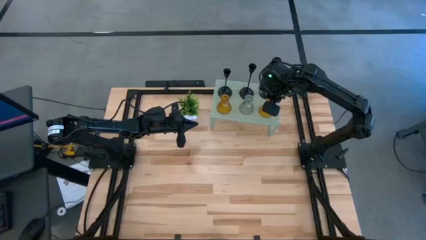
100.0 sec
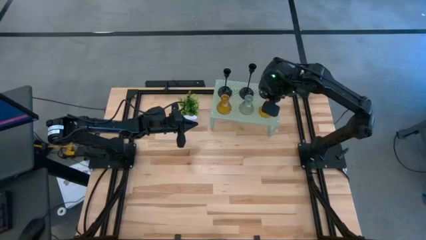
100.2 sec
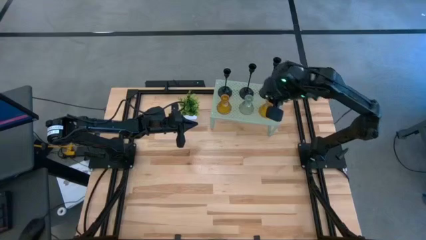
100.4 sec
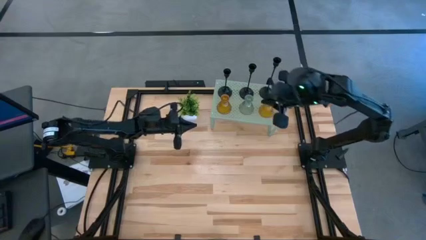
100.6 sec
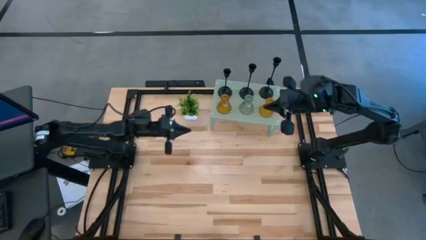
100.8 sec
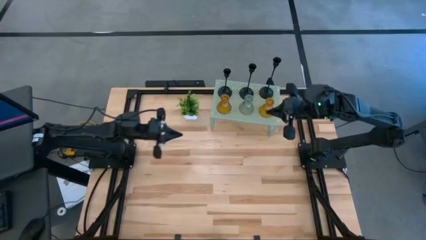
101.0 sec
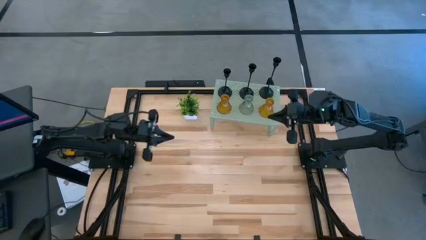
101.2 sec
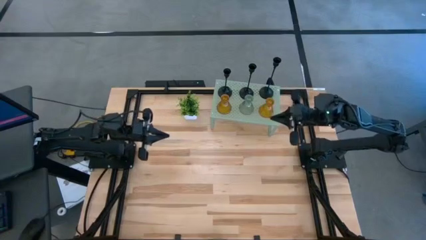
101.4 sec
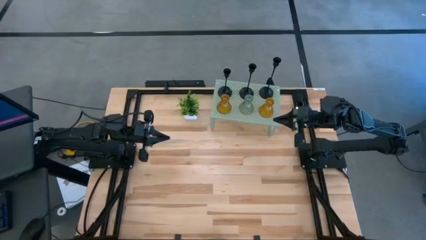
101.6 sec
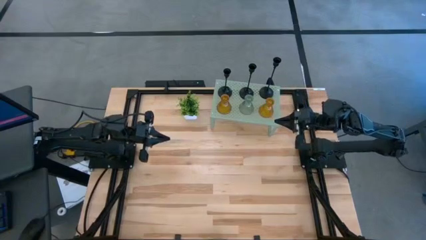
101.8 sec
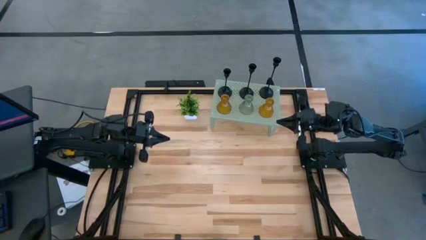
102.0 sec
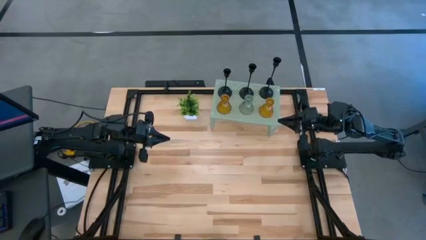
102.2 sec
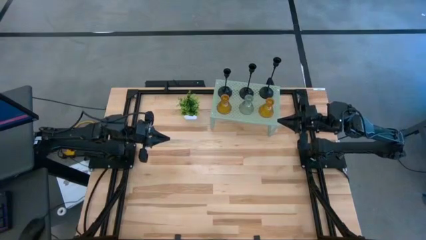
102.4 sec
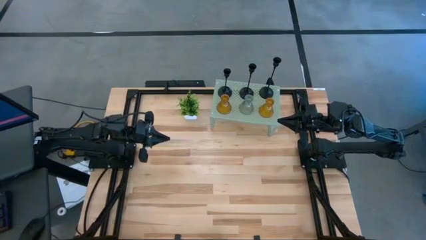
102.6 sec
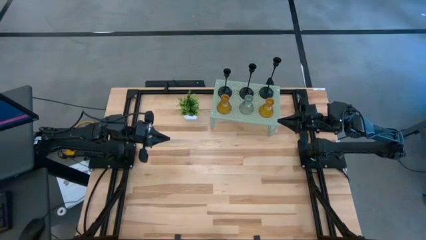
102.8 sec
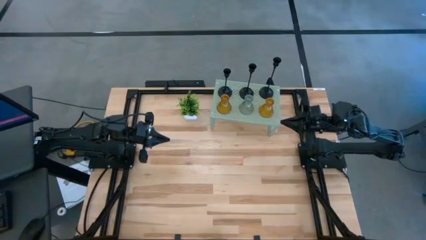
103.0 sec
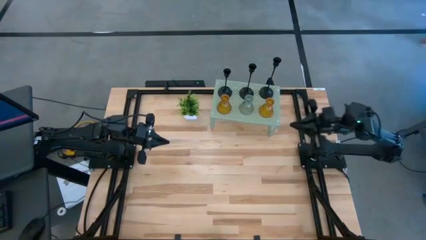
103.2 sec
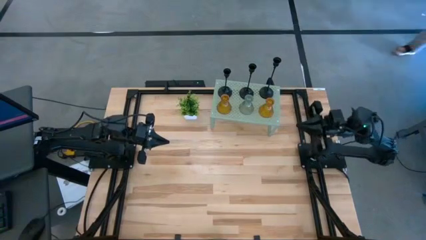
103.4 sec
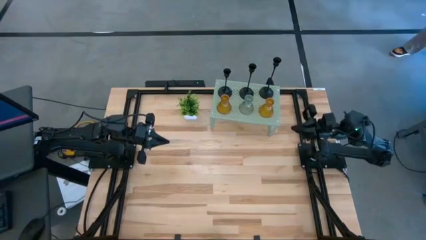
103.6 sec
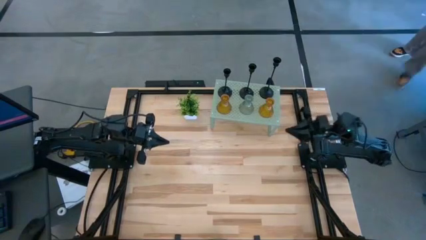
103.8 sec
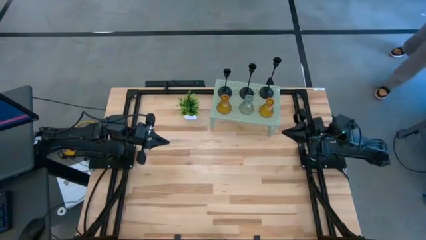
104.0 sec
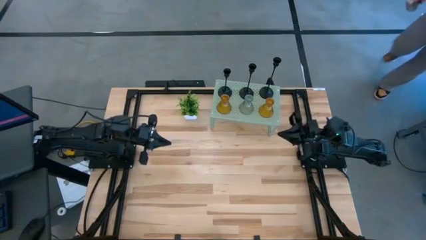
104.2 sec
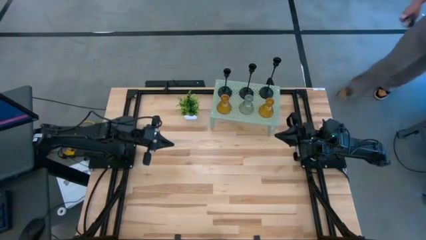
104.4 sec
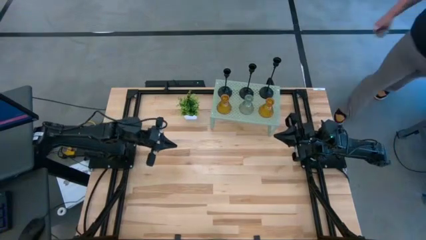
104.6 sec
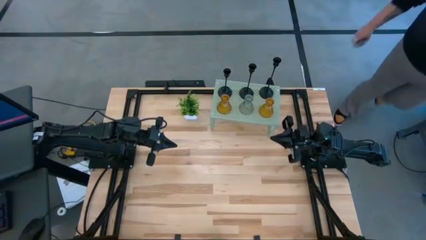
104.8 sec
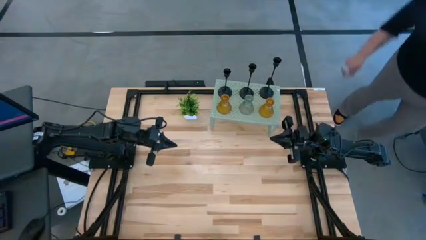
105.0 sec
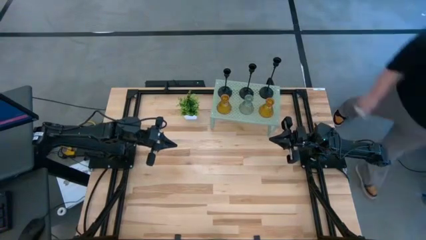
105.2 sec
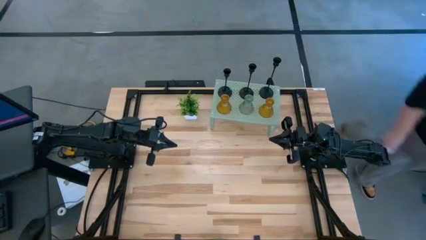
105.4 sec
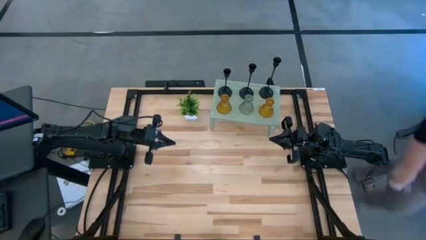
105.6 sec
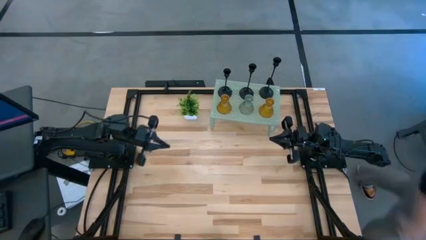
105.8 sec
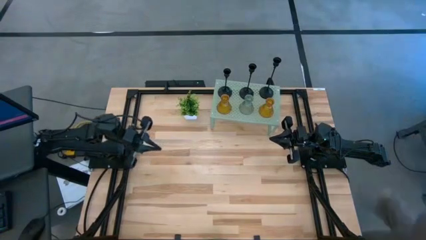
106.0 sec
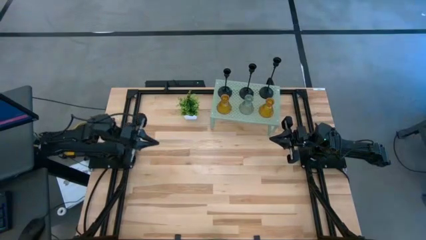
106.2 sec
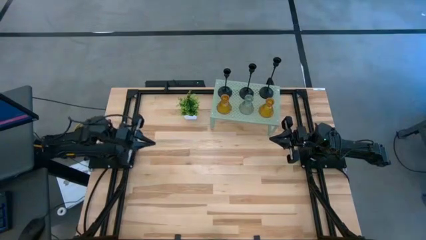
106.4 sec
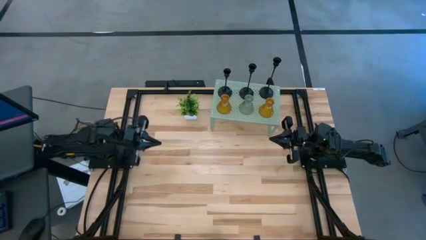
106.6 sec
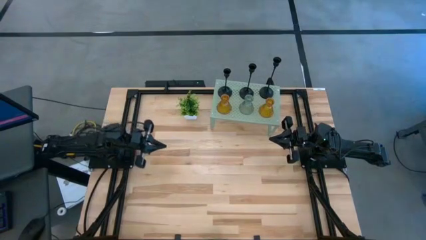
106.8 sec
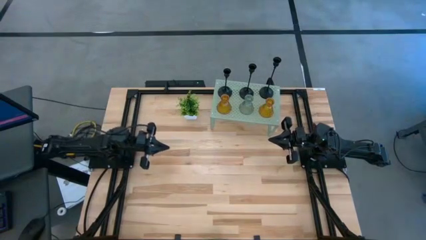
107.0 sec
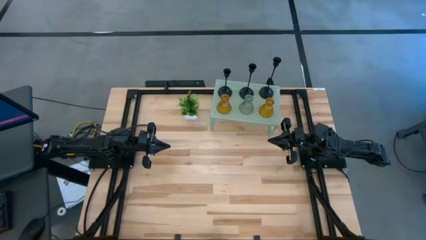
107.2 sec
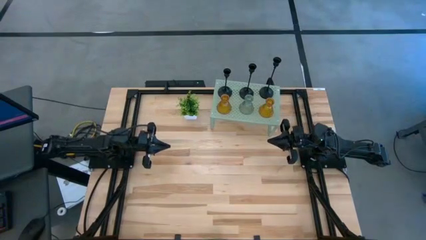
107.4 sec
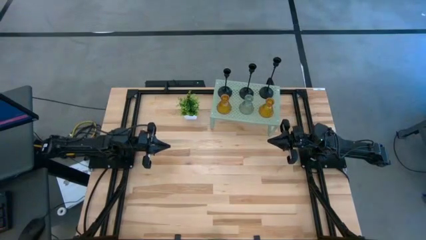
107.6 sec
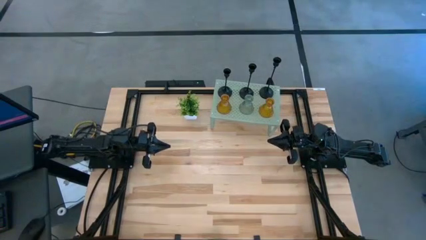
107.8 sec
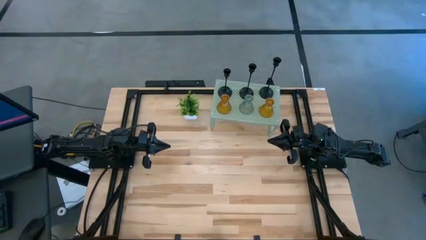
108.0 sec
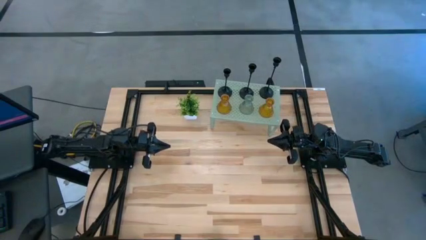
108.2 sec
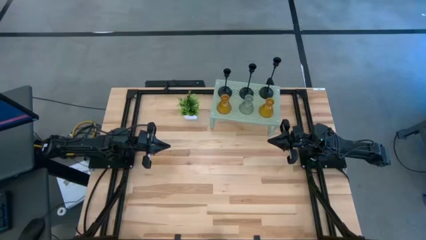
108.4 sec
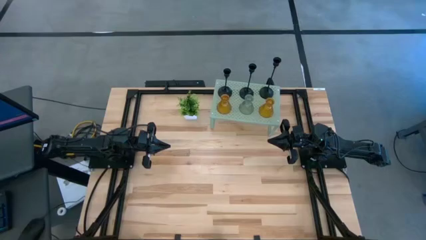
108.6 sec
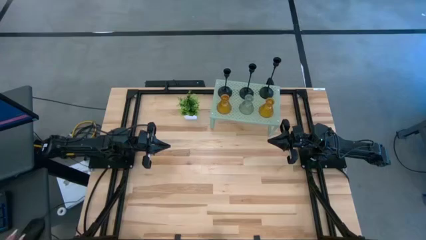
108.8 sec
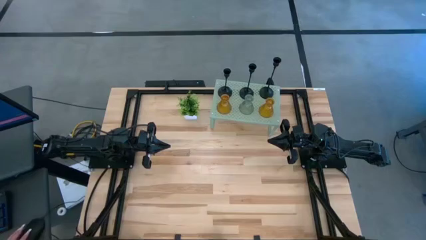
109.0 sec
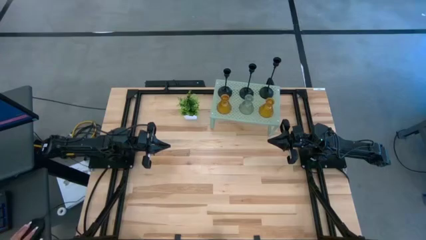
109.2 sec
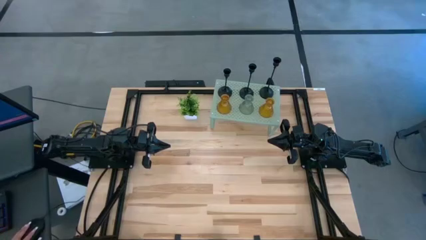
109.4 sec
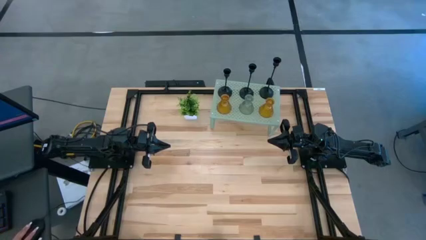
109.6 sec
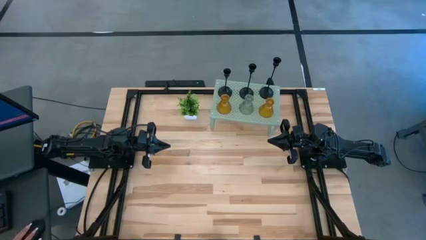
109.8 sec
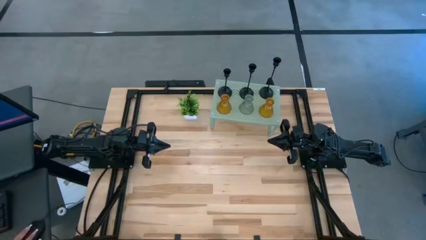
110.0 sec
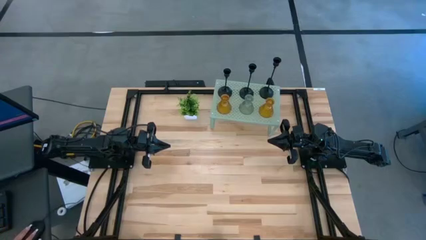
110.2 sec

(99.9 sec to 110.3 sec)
Task: Pick & Place candle stick holders
Return to Home Position
